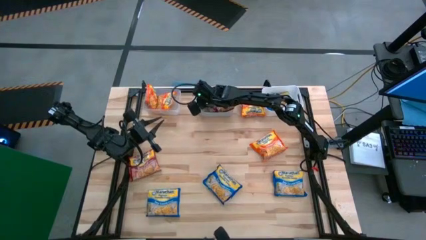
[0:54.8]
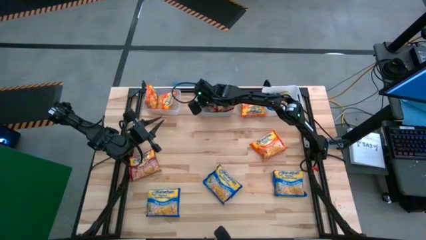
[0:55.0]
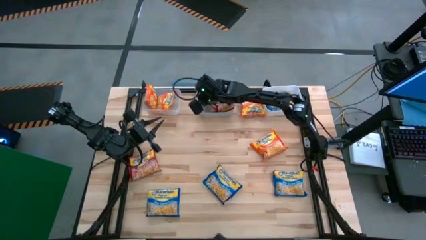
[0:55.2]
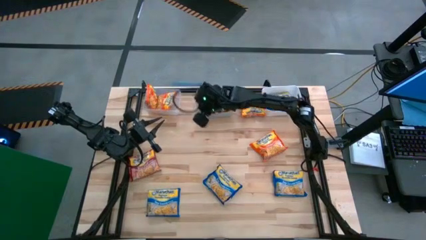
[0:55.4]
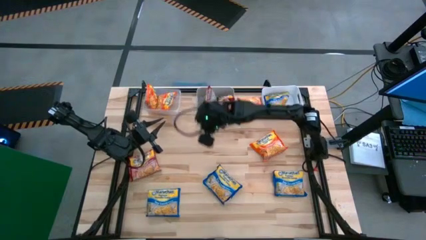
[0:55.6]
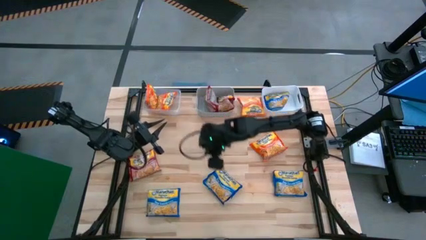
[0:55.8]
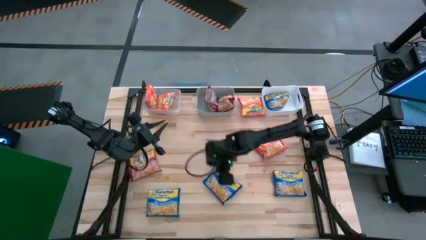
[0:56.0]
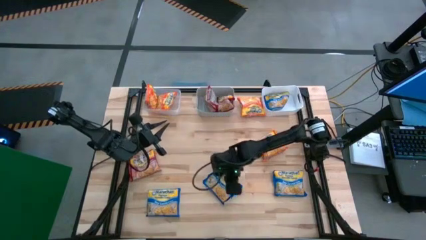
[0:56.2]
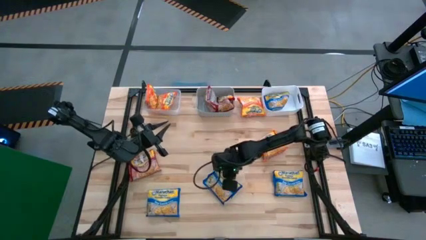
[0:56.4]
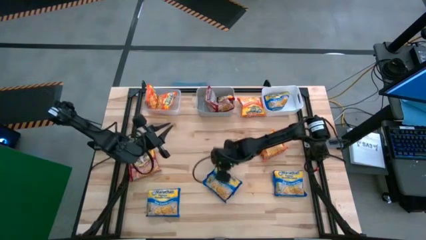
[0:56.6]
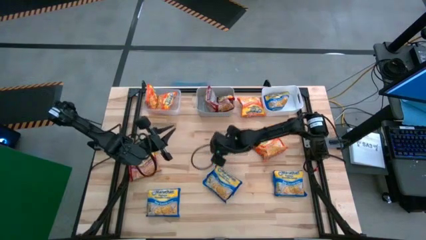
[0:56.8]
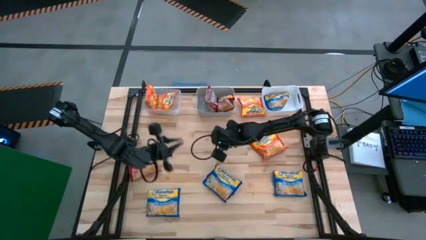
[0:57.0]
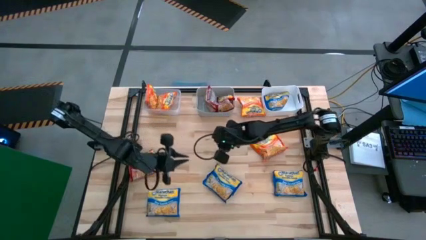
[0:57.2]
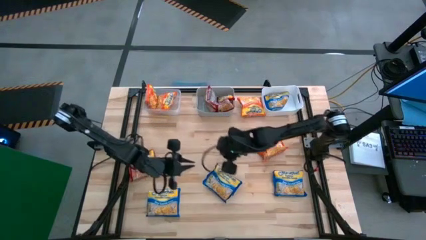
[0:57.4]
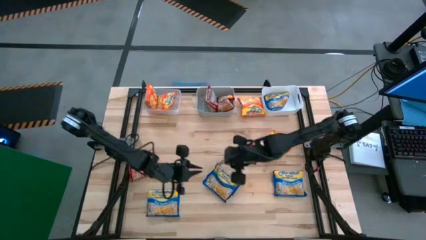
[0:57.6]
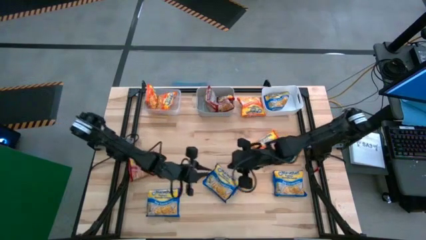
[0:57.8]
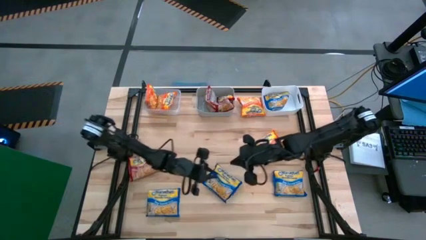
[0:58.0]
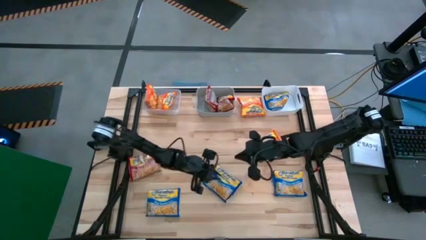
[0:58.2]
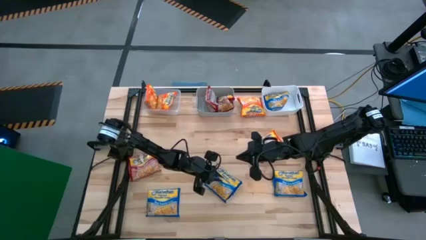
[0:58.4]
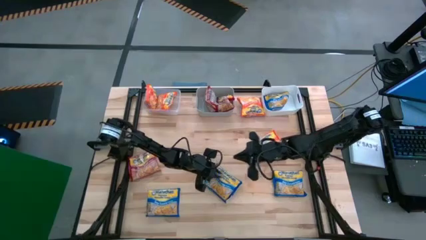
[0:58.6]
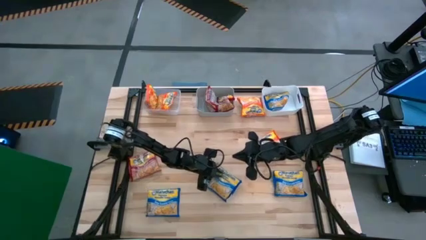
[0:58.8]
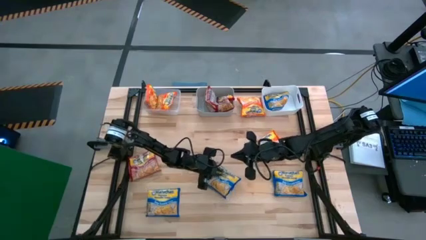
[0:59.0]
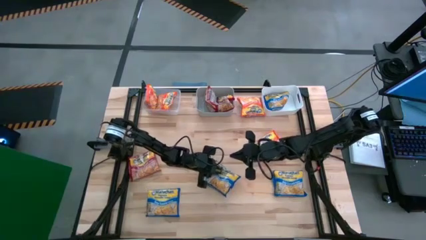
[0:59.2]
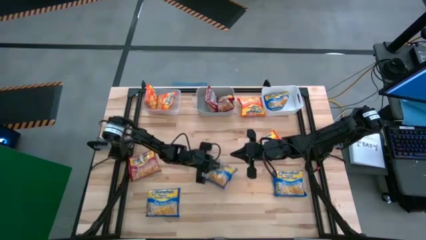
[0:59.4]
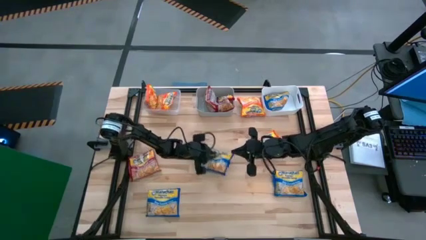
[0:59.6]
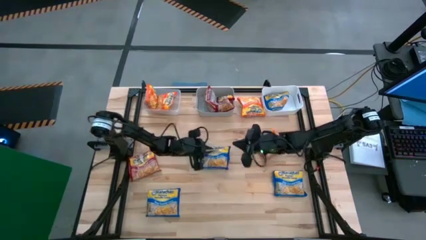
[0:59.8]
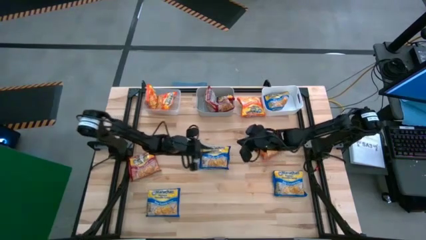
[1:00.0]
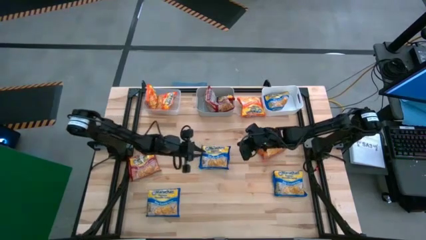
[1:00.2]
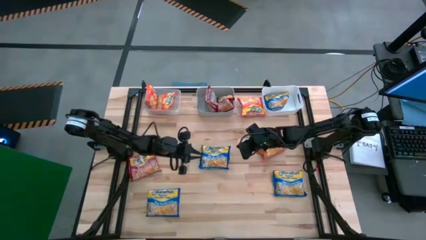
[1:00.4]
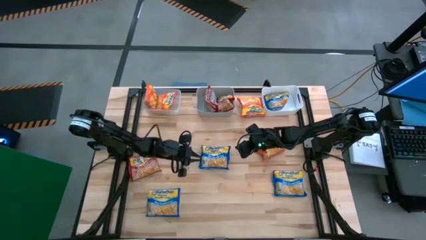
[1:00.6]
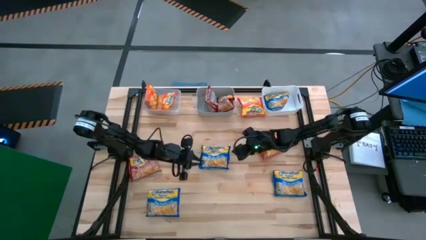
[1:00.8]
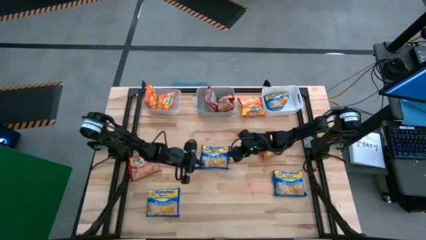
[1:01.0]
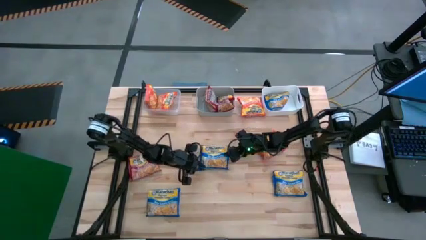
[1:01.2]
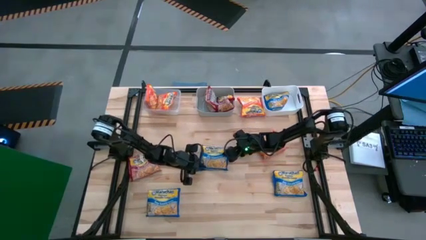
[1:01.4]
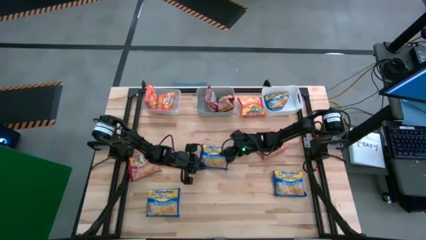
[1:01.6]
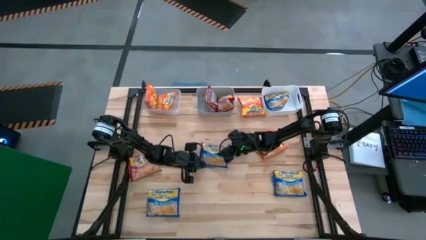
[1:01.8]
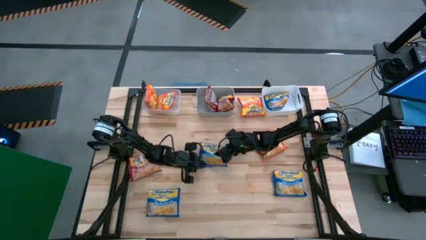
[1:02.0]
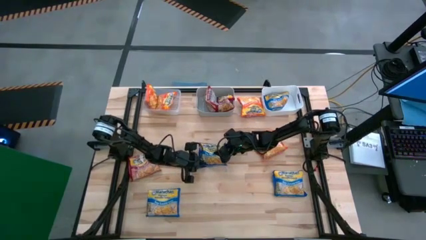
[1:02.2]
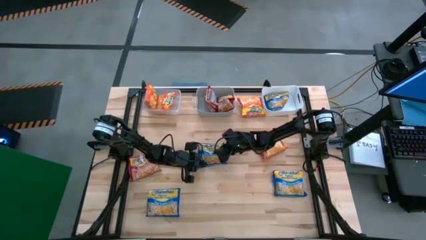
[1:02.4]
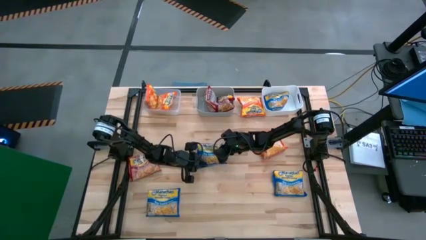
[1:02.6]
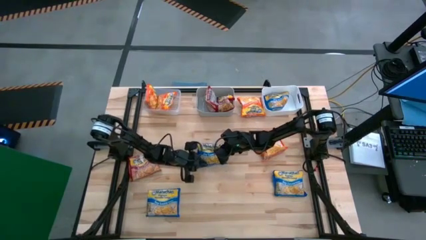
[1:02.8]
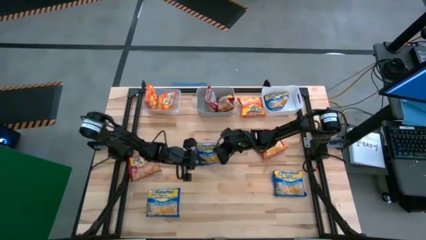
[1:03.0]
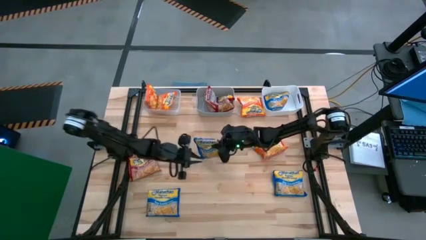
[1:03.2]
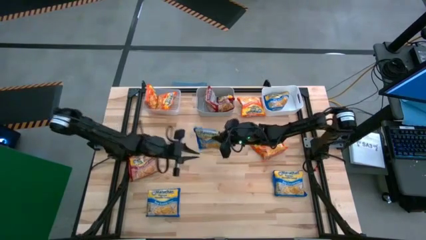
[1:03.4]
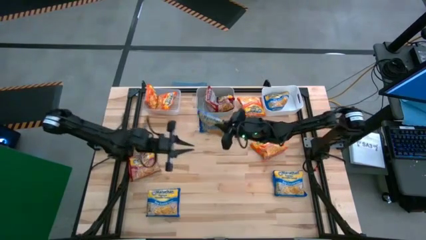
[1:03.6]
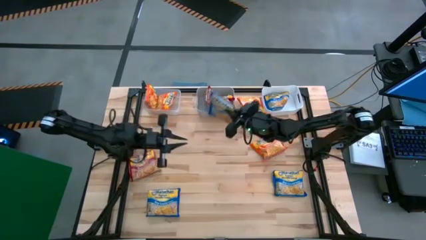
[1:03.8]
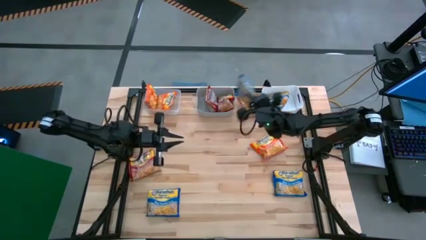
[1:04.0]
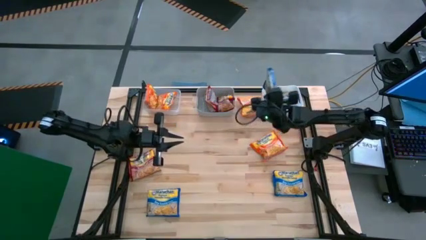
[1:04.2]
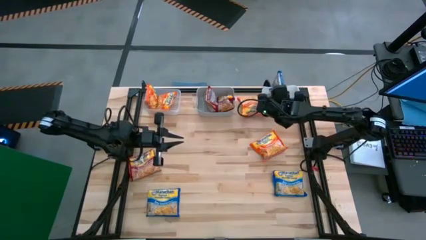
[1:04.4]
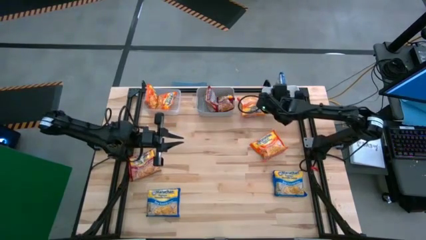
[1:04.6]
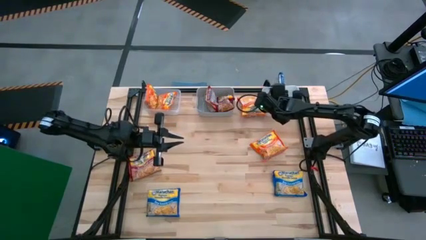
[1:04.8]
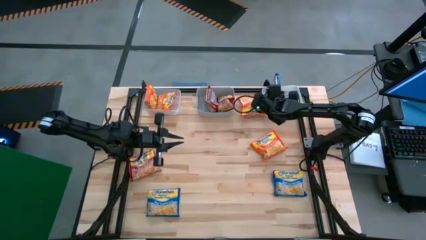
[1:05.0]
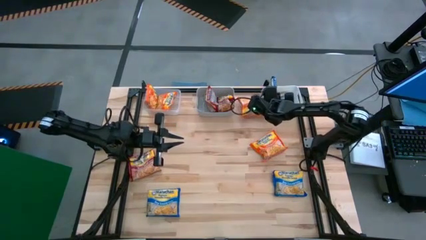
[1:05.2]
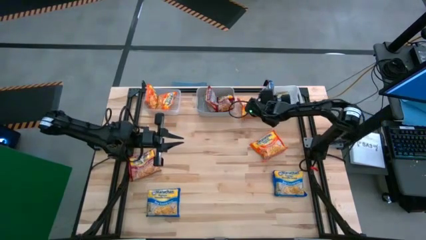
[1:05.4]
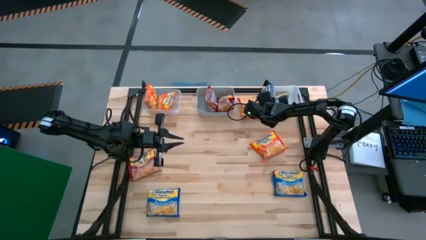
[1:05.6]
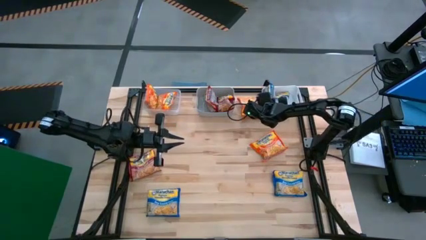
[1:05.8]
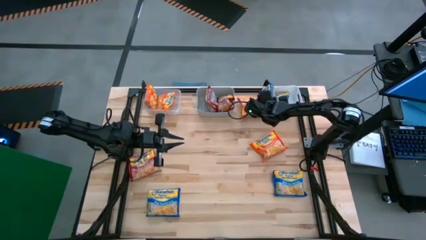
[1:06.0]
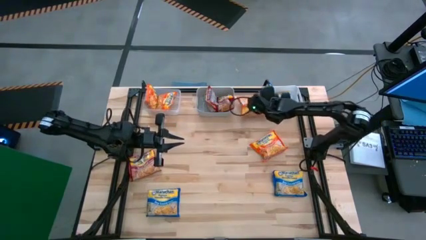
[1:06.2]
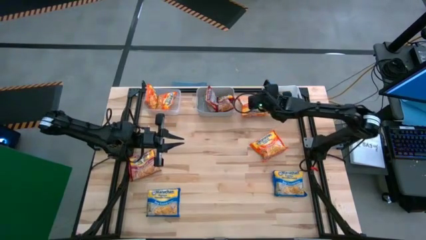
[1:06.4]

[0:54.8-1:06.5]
Task: Sort Maruchan noodles
Put the blue noodle pack into the white bin

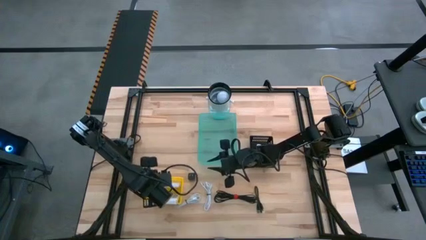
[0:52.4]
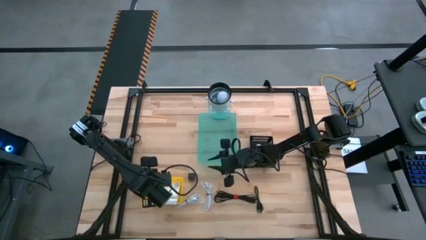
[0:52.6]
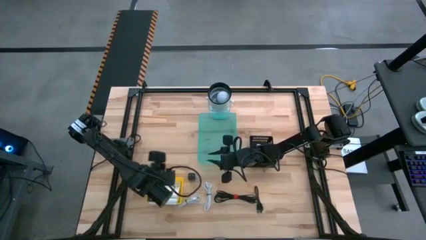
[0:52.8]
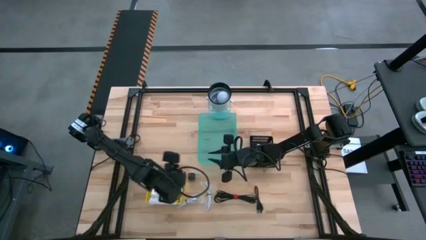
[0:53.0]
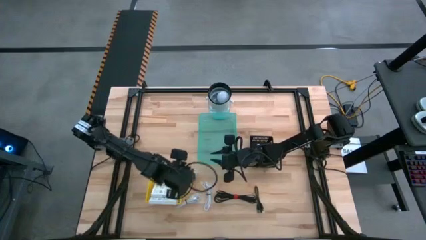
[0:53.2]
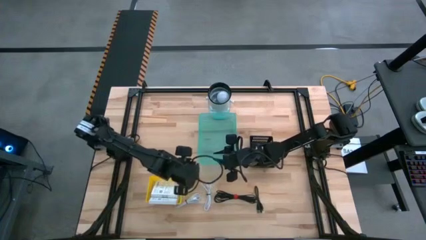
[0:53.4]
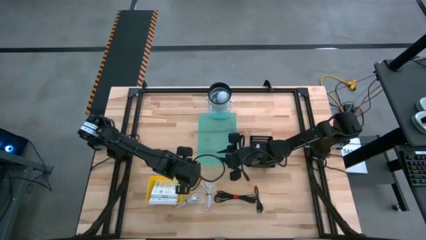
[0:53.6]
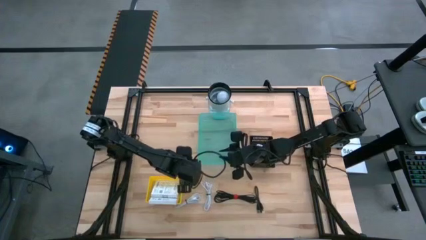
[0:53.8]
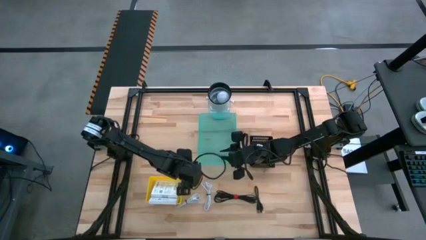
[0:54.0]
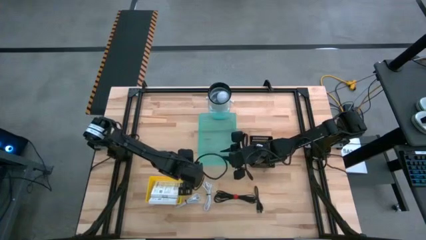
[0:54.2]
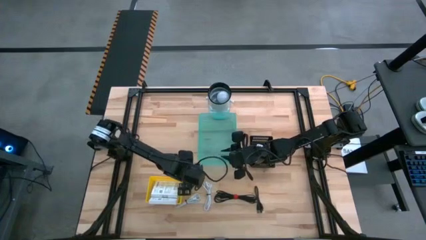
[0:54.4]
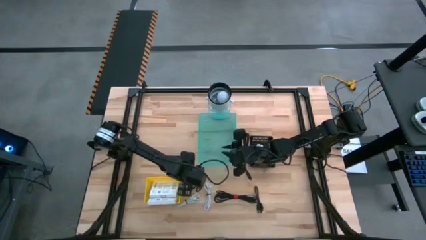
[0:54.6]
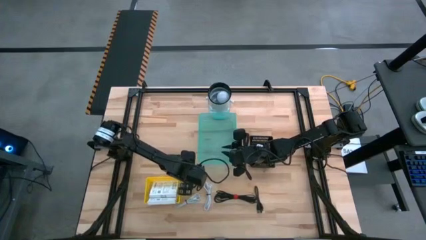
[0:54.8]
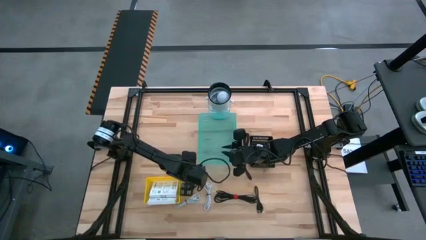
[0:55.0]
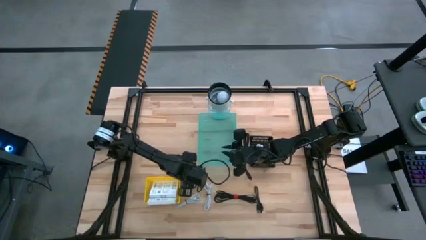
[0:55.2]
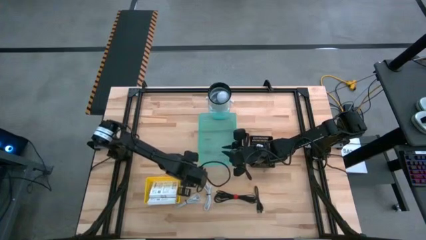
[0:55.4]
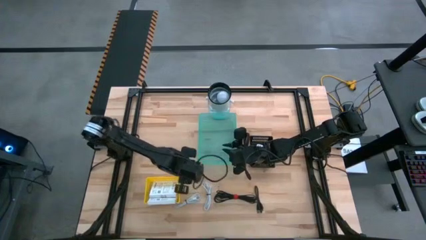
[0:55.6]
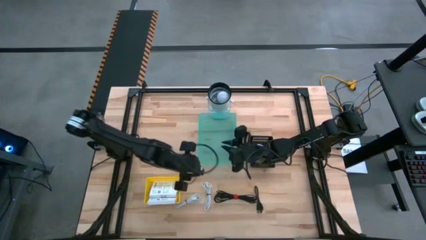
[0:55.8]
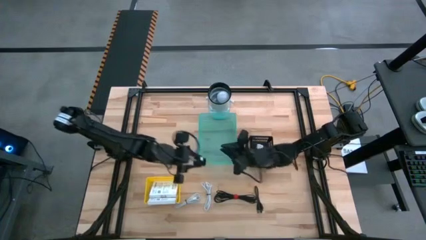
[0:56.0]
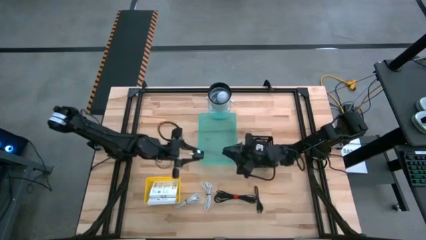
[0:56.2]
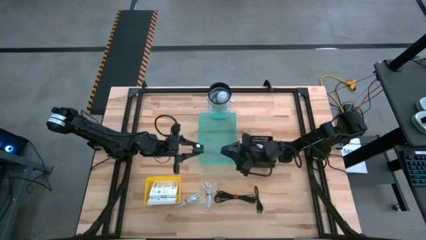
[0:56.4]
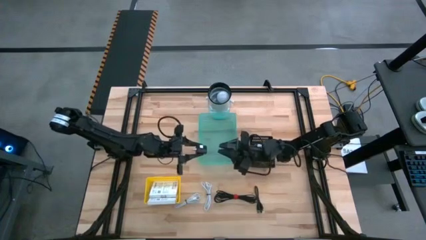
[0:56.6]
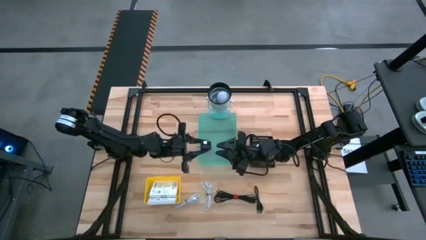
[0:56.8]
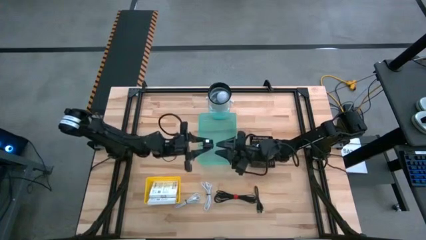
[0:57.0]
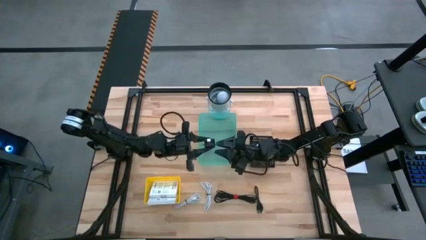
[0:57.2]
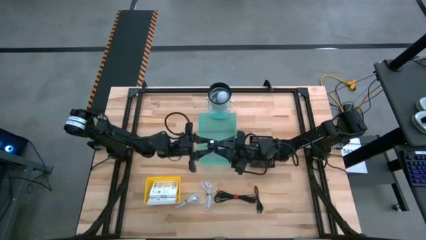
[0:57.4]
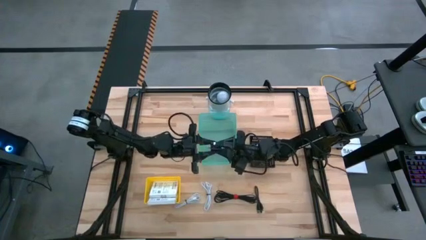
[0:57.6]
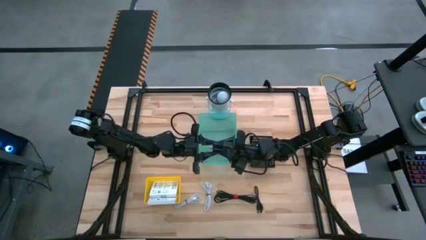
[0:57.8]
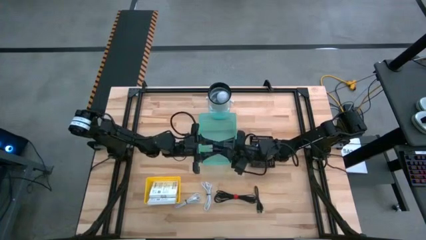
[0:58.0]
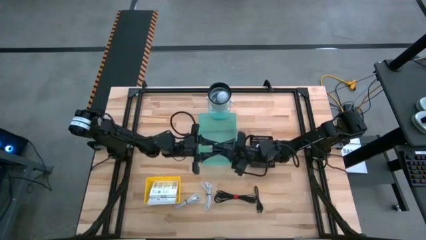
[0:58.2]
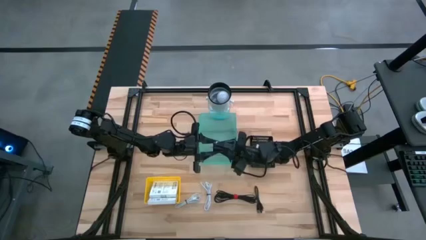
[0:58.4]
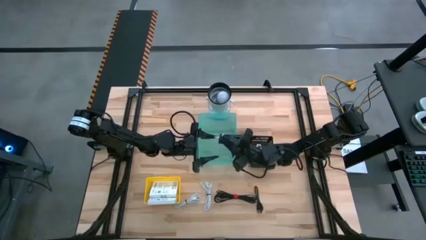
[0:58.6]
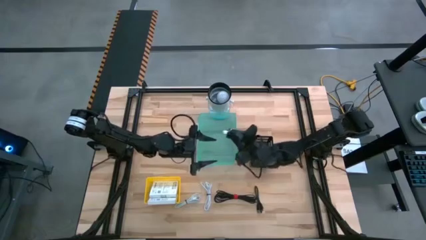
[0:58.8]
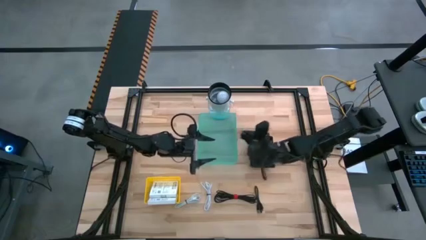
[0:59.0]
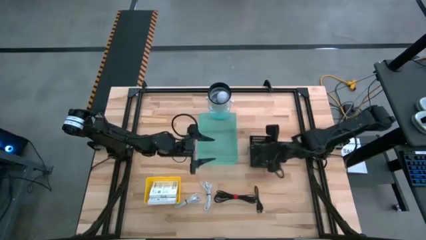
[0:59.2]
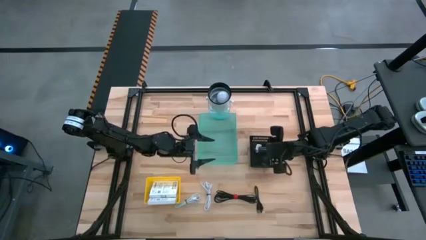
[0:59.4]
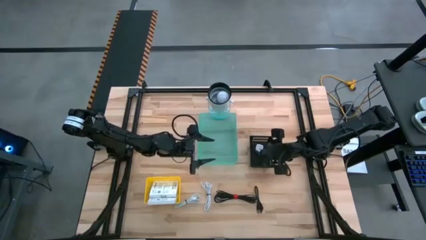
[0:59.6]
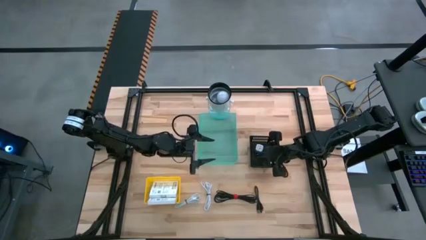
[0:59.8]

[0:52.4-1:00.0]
Task: Pick and place items into bin
Put the black charger adapter into the black bin
